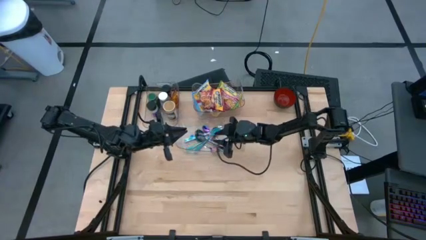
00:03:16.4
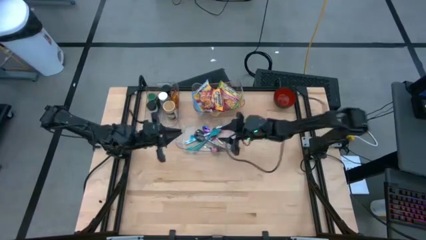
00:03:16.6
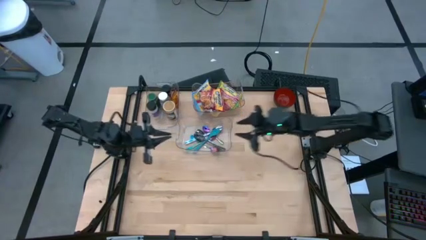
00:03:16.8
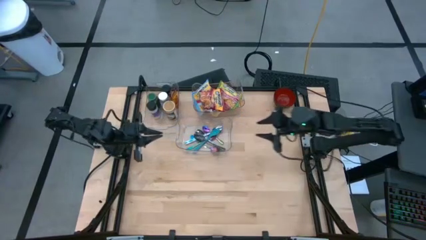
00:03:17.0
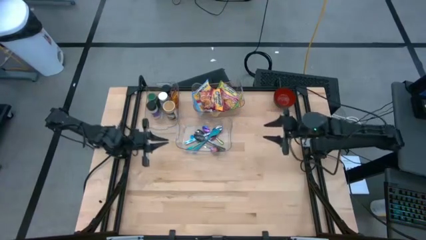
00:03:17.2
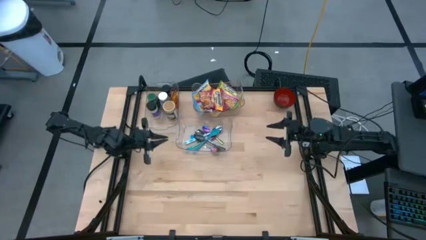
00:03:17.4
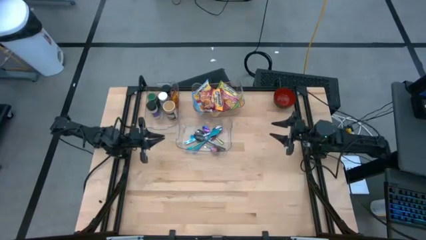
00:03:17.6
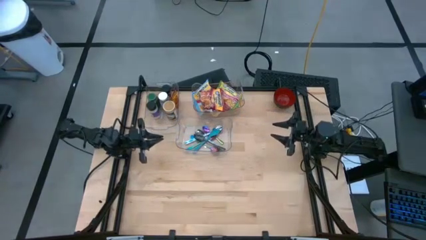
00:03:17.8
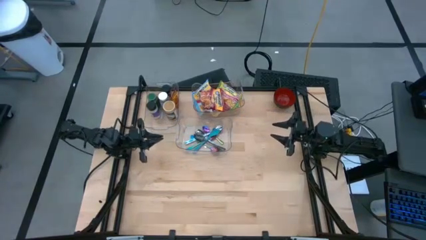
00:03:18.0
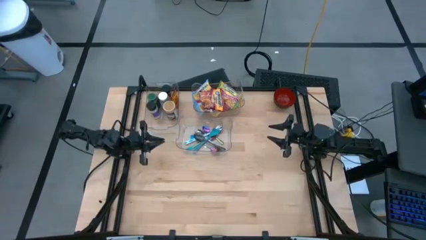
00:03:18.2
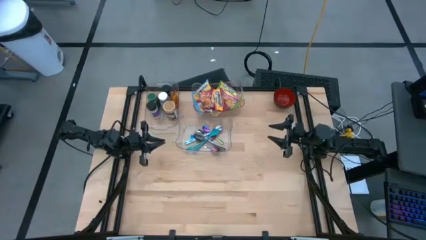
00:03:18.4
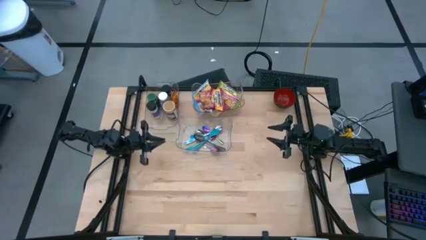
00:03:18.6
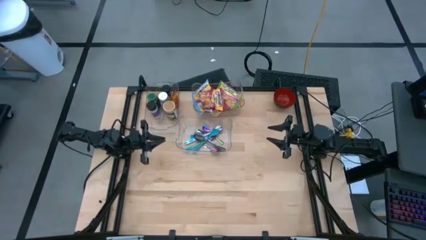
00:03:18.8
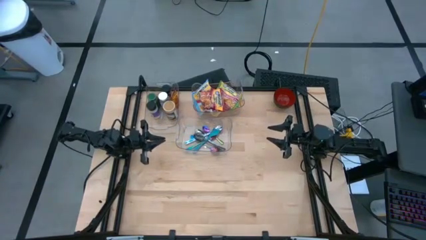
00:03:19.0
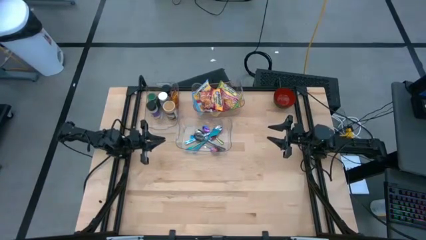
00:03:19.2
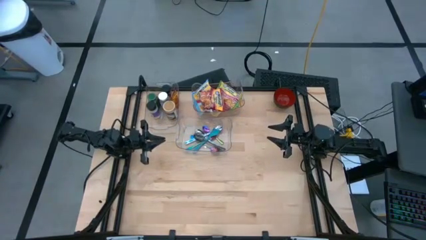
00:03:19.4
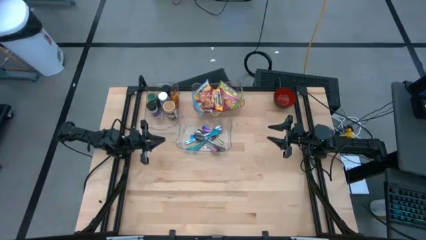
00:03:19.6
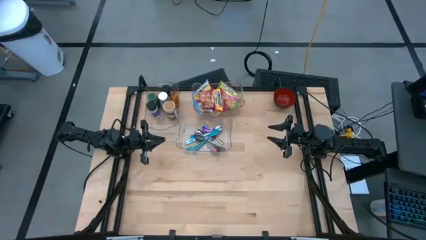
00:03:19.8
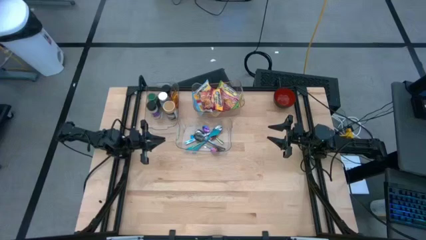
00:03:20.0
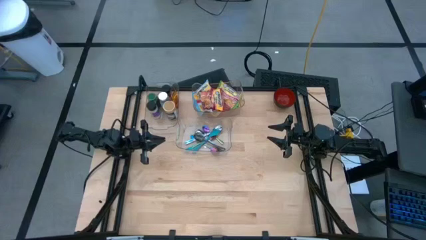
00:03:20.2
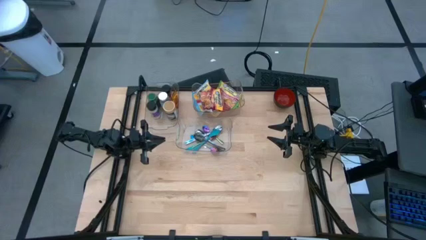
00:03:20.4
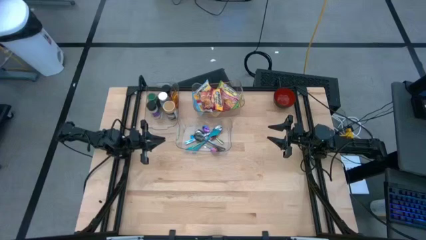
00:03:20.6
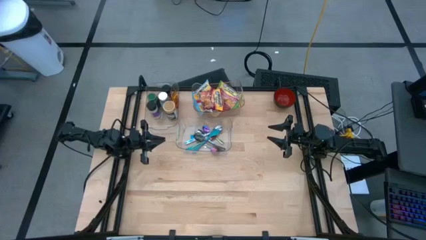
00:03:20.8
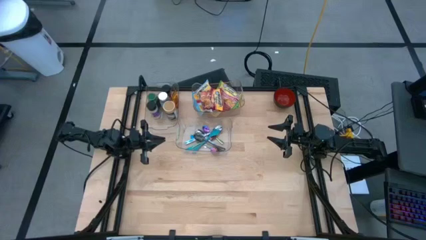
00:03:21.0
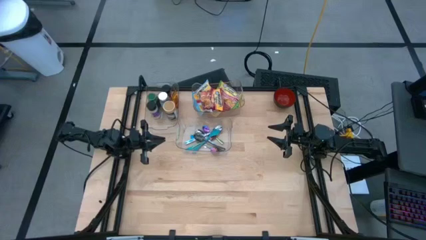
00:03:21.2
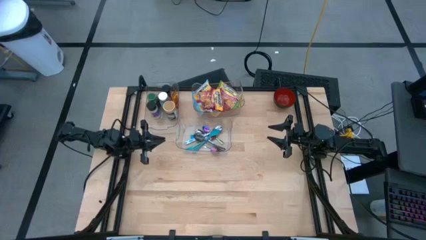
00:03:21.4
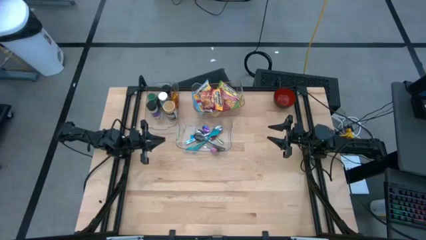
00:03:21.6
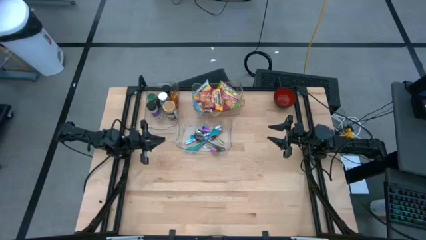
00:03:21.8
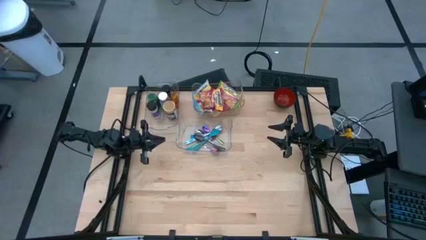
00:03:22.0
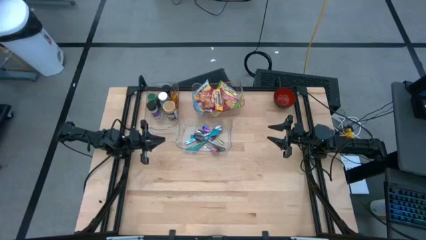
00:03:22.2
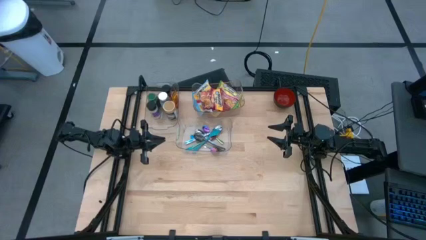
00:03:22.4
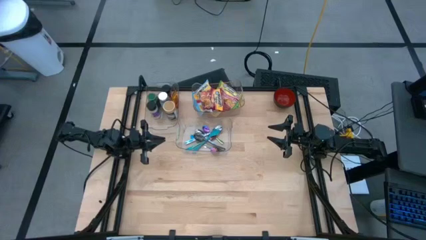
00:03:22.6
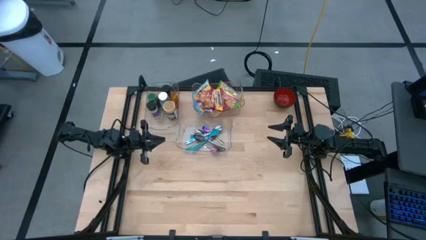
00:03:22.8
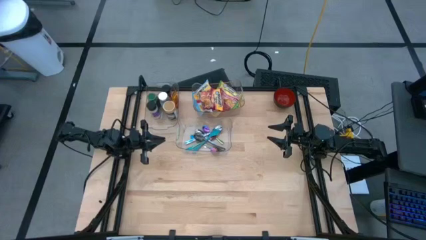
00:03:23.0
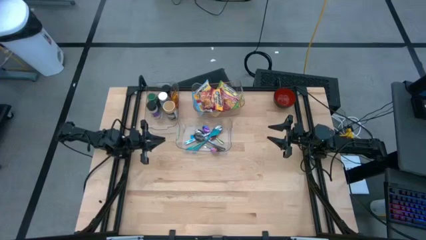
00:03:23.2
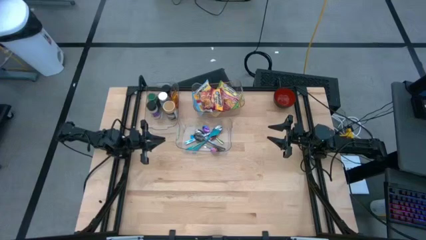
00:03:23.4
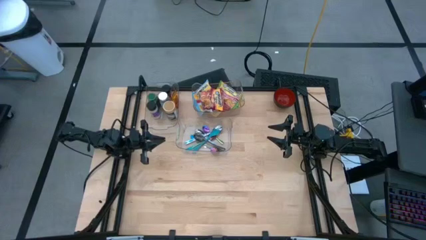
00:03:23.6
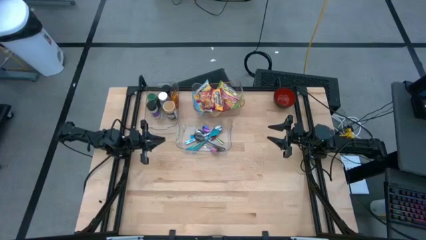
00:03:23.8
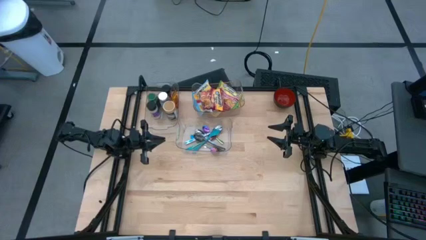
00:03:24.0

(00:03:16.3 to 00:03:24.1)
Task: Pick & Place Food Item
Return to Home Position

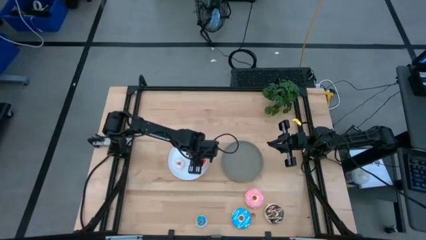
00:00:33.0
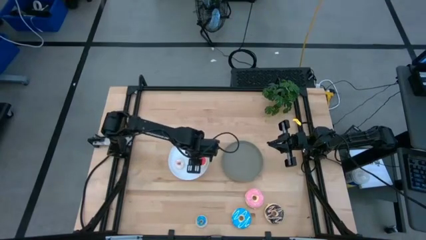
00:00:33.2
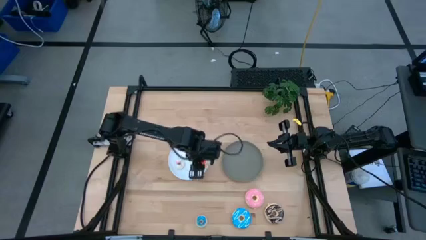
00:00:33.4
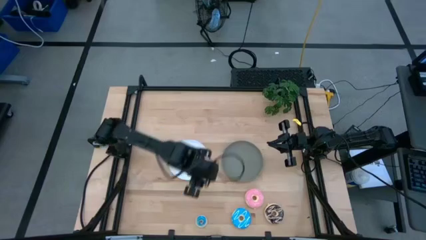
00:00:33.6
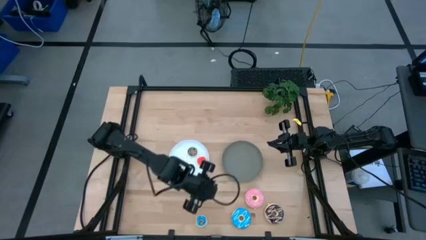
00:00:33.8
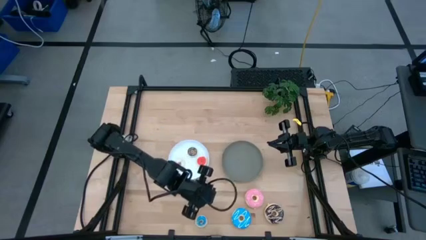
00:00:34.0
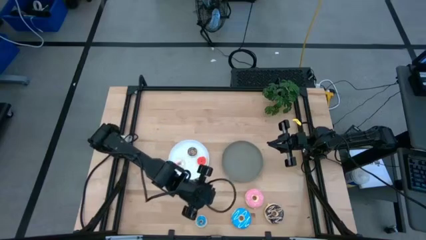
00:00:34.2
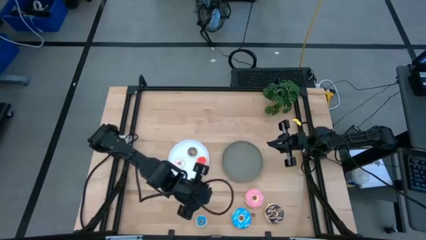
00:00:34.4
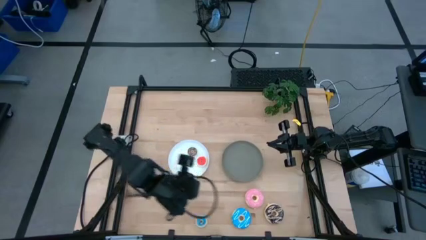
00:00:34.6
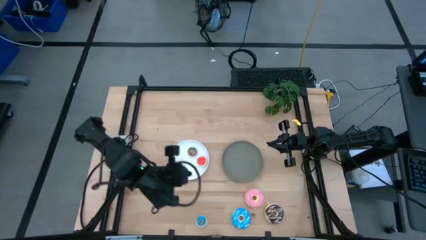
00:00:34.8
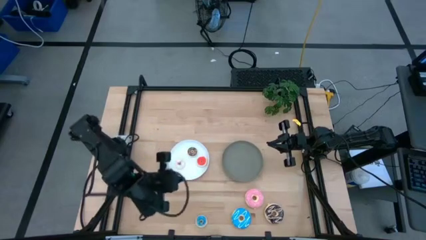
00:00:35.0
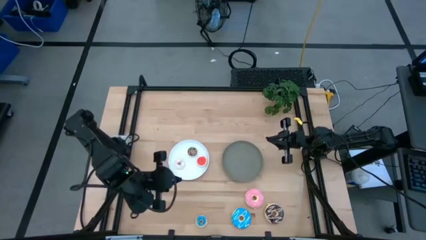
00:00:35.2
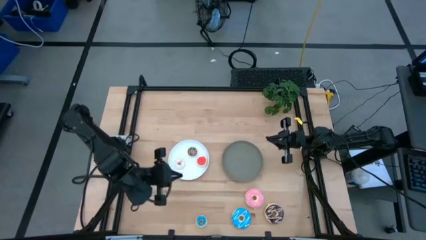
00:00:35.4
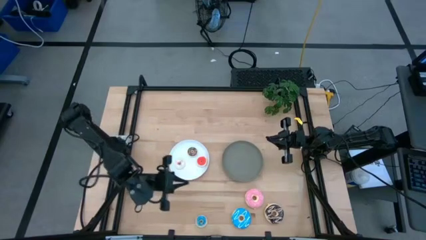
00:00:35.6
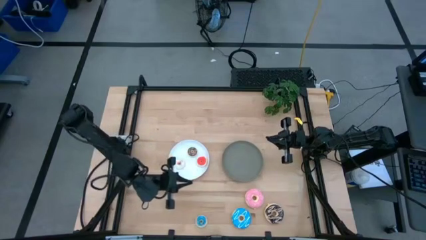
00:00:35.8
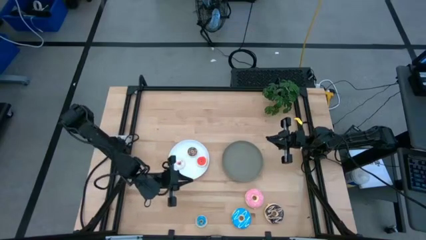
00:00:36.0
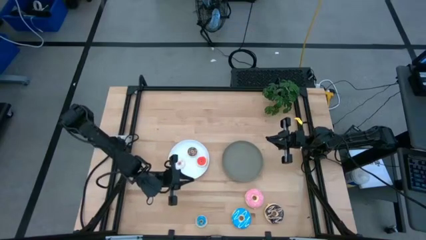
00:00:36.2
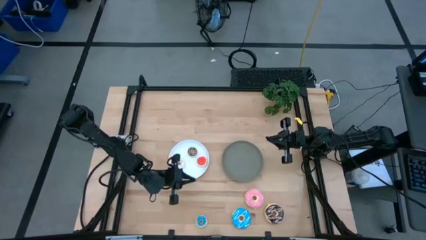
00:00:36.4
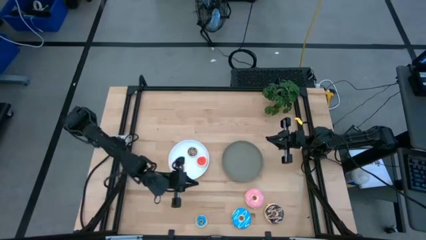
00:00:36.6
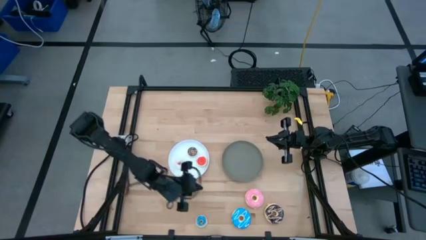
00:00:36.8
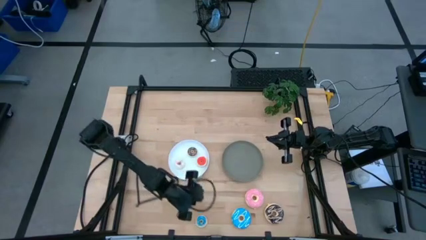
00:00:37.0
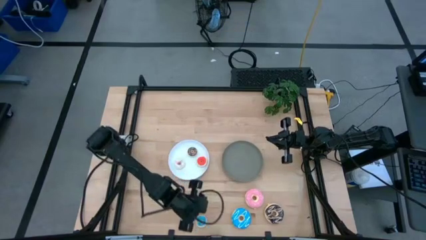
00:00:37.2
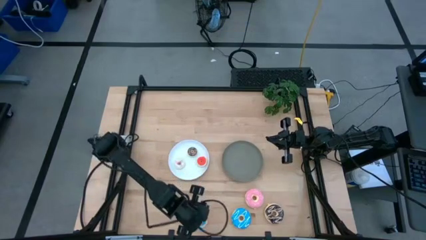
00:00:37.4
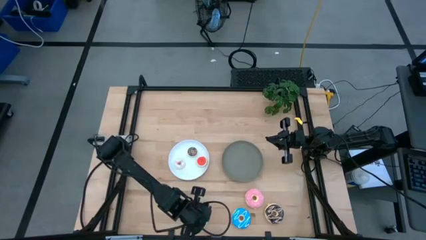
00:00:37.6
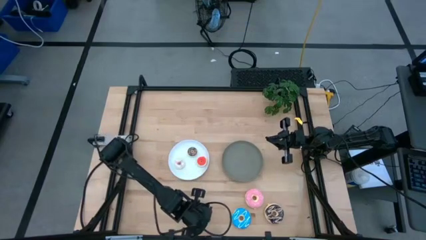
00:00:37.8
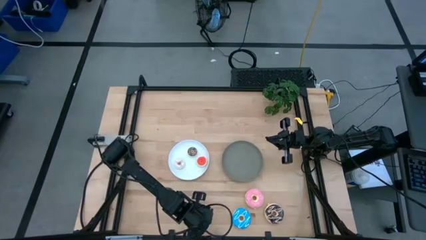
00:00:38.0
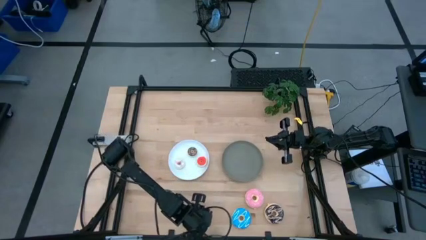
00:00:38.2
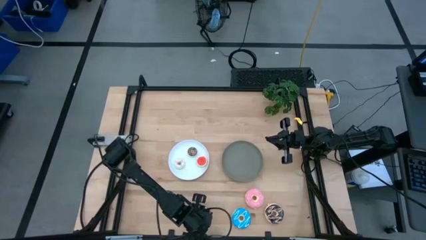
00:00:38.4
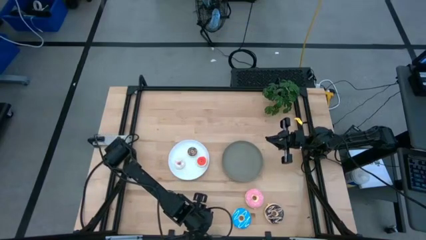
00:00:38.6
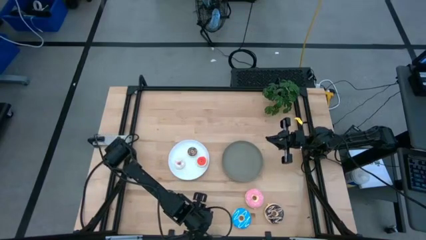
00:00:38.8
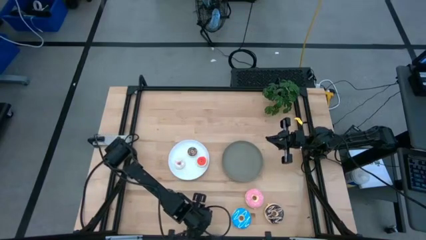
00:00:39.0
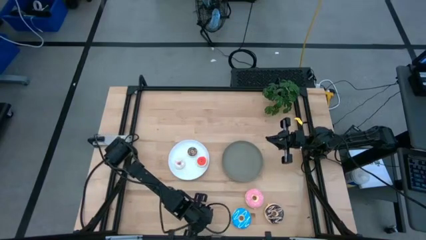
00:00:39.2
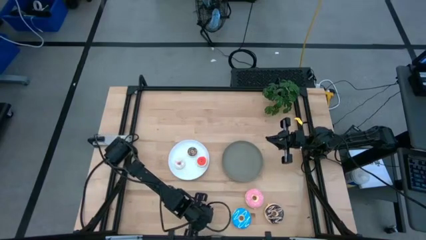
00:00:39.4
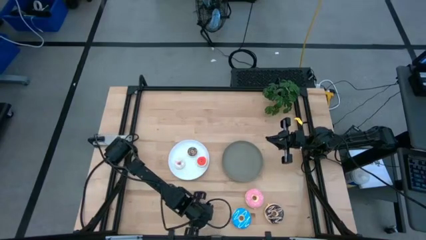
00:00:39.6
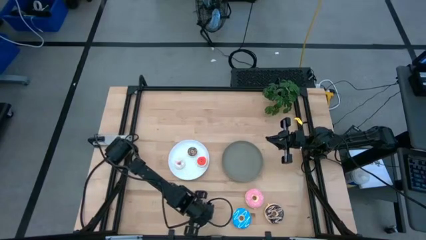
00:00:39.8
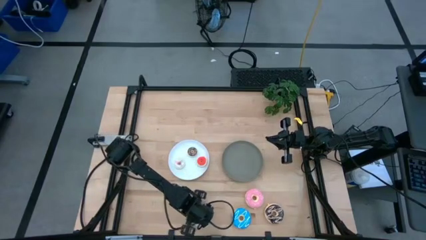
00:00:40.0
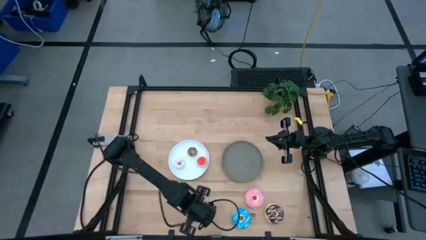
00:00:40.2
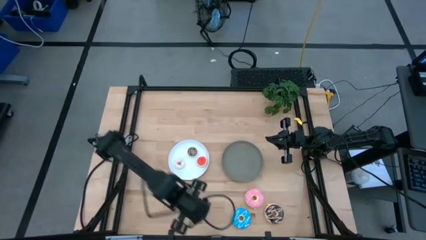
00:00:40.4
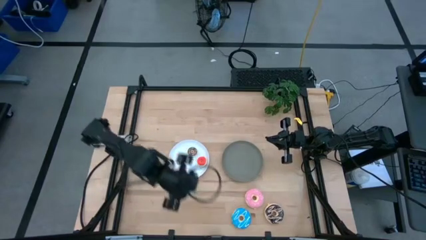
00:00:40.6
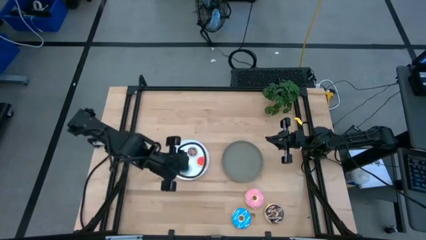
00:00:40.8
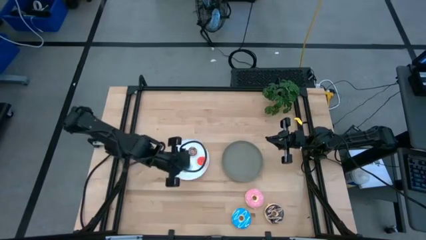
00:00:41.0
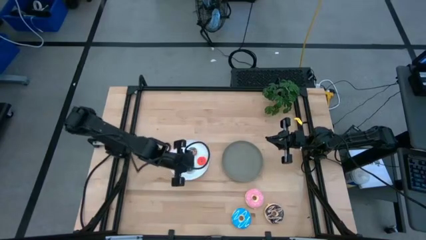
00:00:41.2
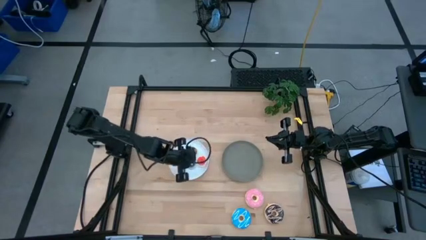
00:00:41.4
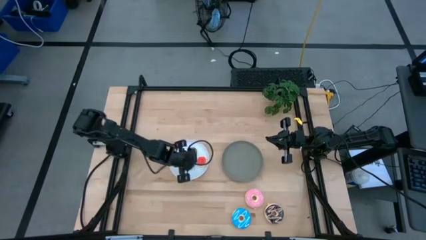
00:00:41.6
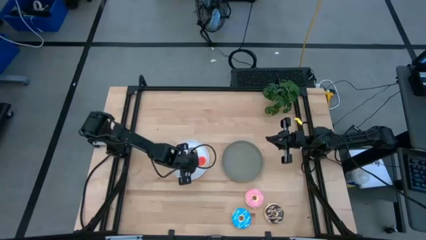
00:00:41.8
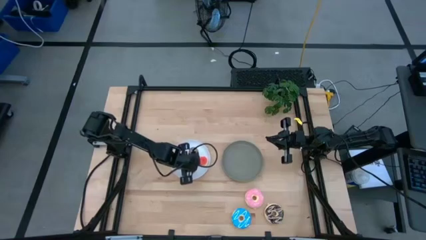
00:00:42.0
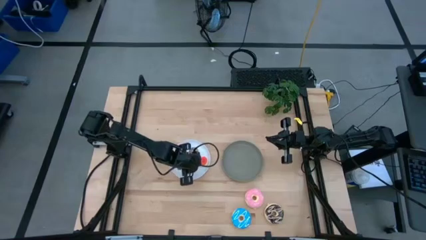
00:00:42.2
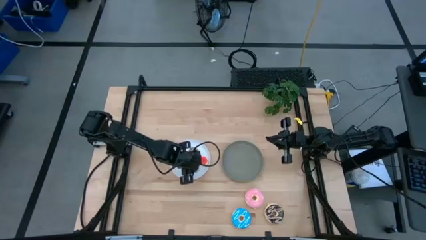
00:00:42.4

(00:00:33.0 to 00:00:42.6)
Task: Pick & Place donuts
Put the small blue doughnut on the white plate
